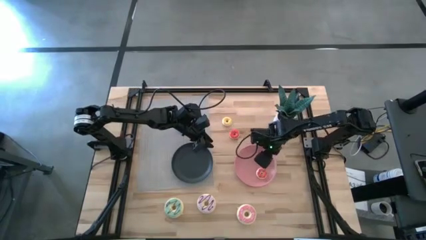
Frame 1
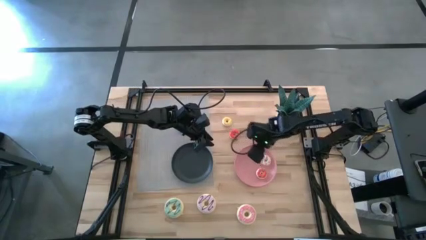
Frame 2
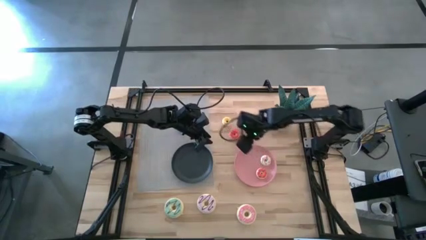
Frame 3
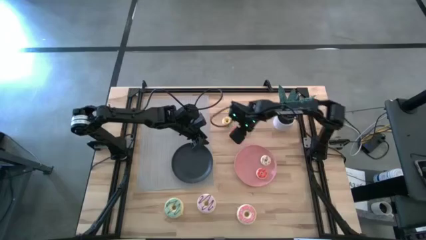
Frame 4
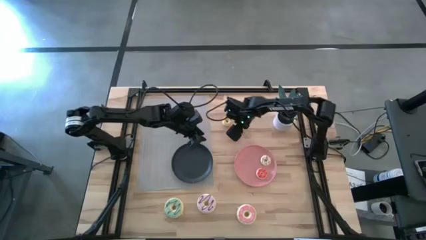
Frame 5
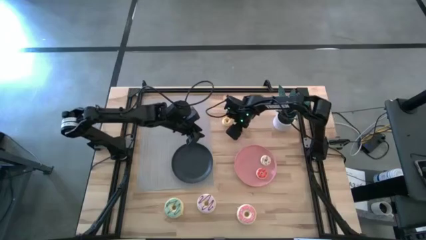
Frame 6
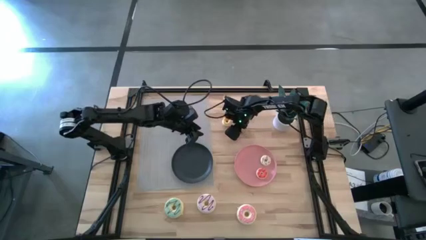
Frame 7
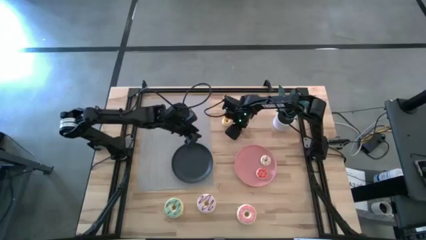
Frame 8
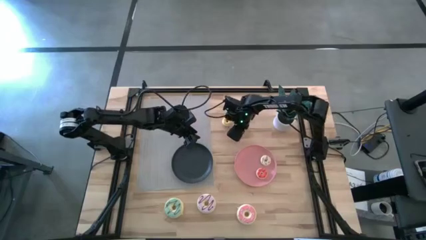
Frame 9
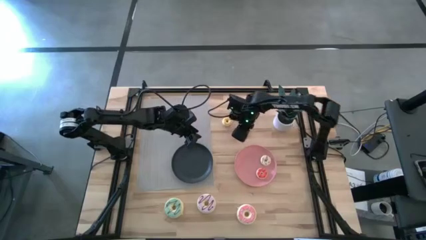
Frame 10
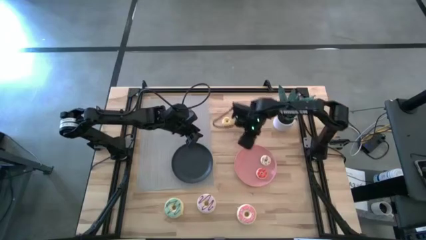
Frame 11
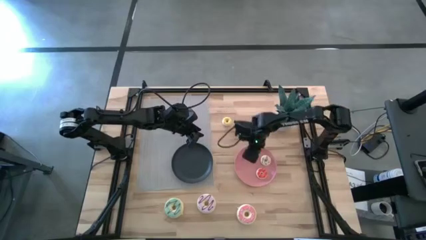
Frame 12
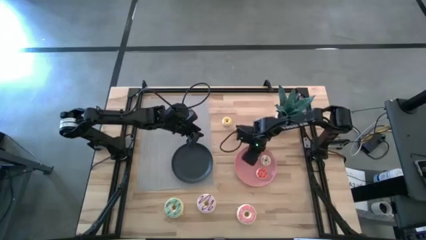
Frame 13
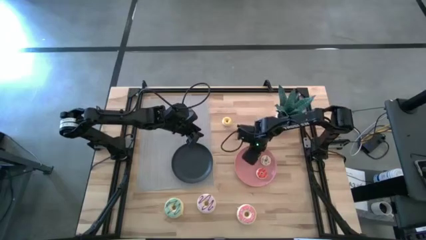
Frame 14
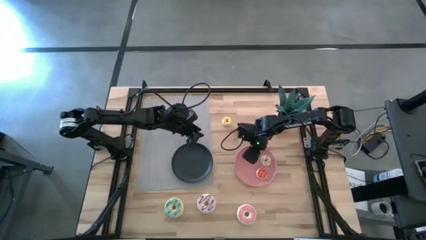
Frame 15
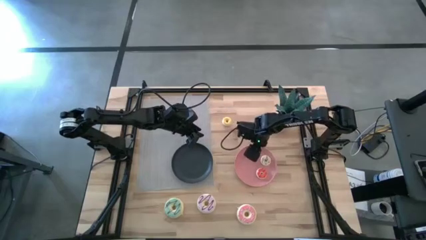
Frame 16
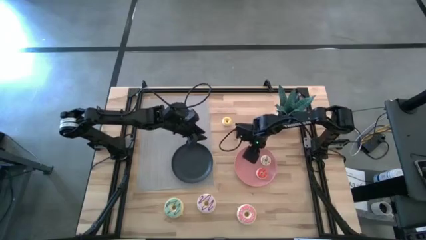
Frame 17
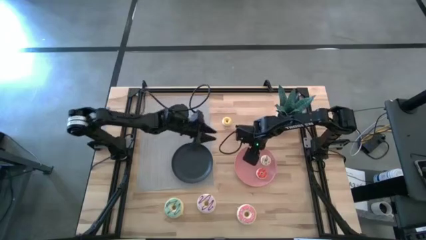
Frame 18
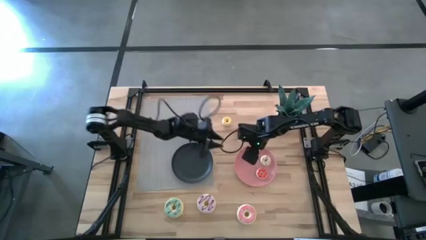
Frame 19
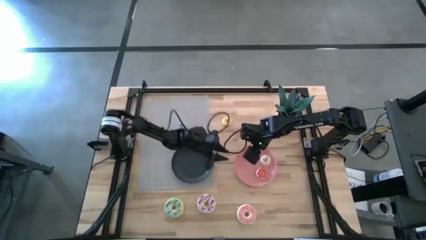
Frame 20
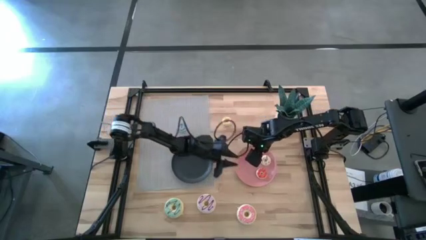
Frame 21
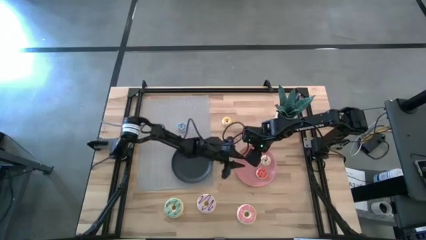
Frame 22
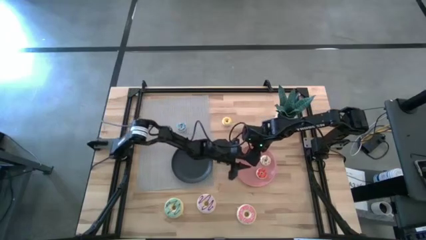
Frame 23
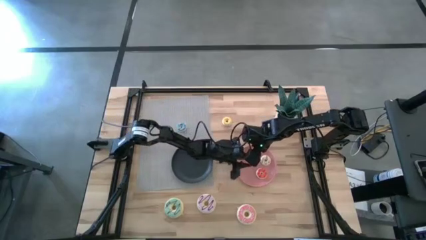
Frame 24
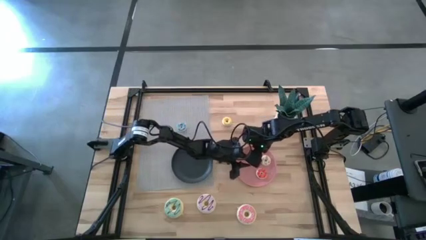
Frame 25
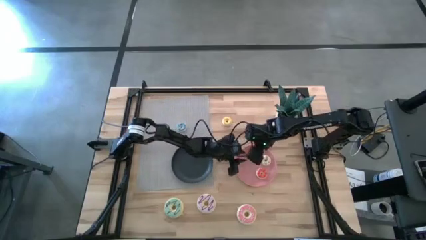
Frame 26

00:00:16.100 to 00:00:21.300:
Task: Pick & Place donuts
Put the small red donut onto the pink plate

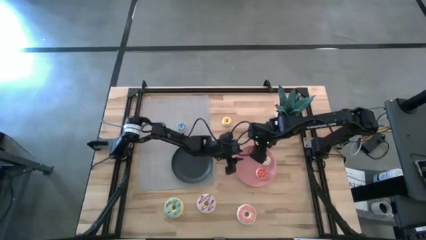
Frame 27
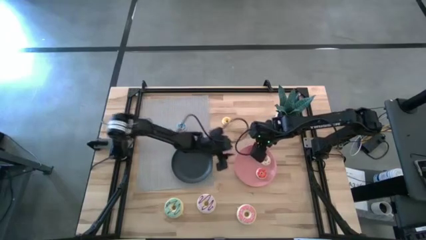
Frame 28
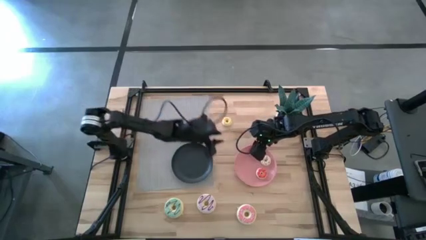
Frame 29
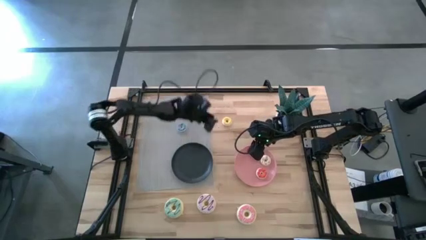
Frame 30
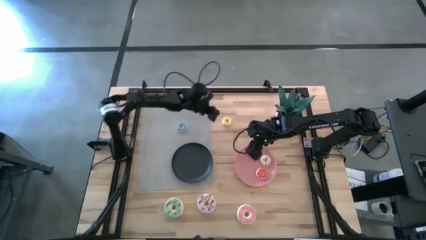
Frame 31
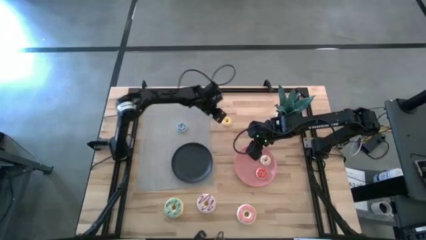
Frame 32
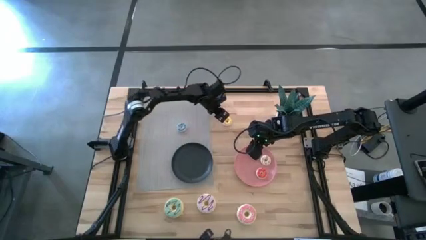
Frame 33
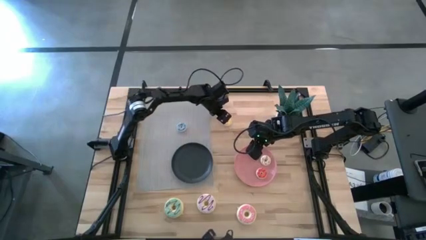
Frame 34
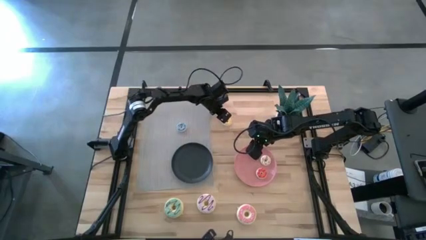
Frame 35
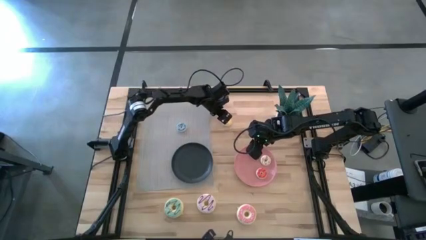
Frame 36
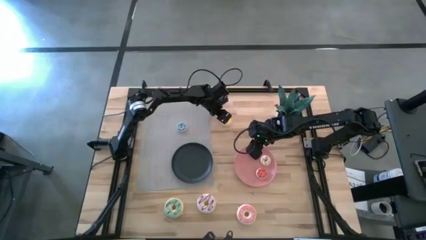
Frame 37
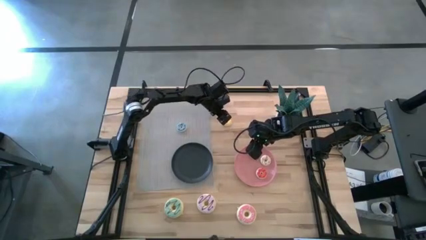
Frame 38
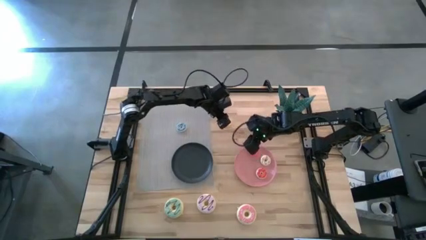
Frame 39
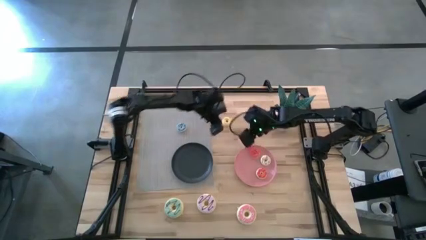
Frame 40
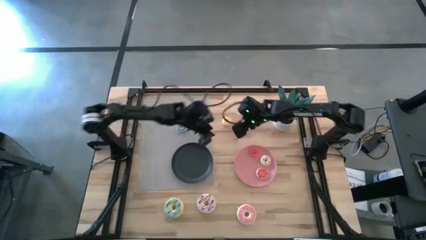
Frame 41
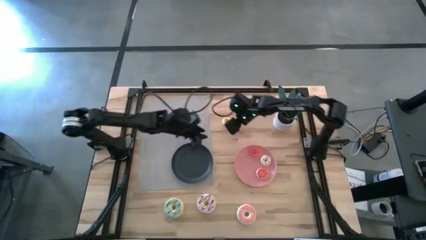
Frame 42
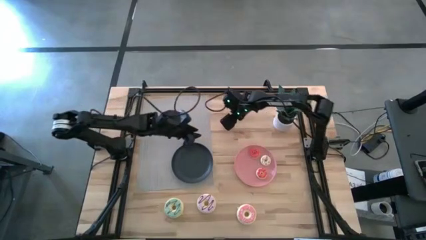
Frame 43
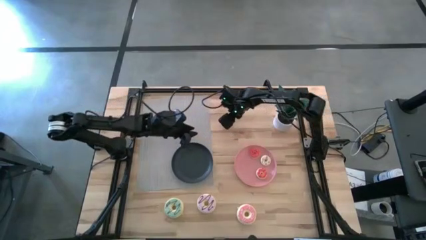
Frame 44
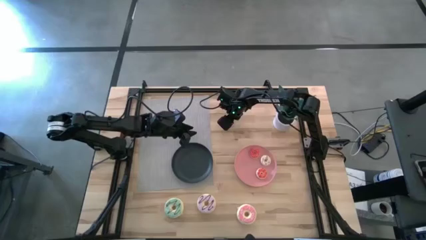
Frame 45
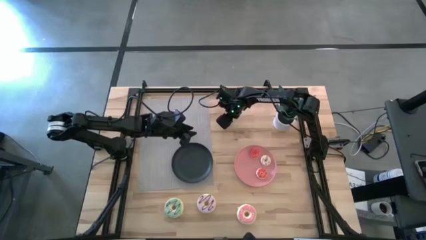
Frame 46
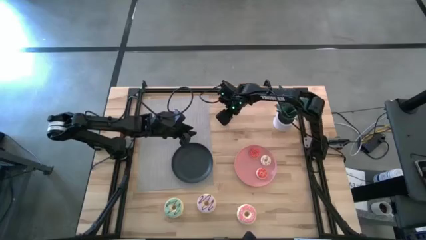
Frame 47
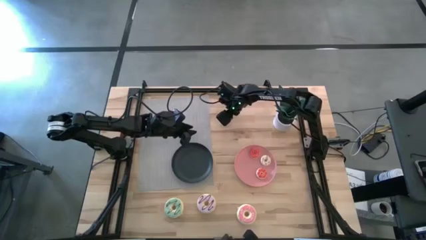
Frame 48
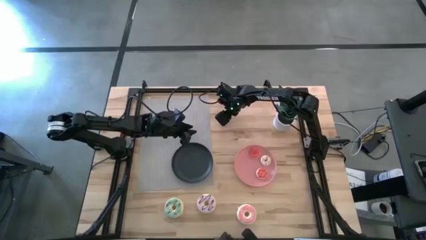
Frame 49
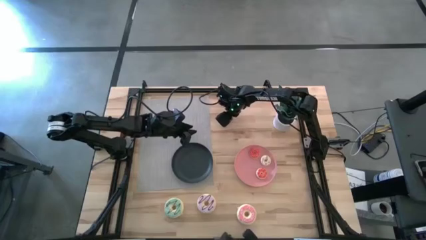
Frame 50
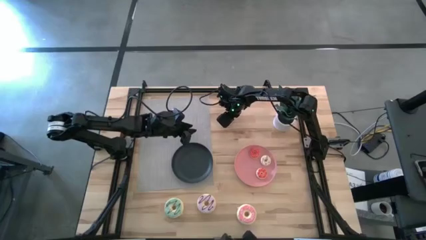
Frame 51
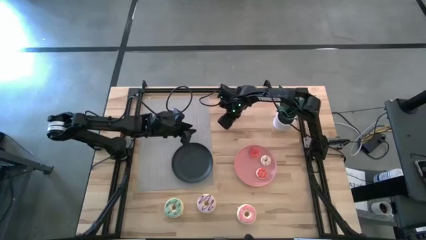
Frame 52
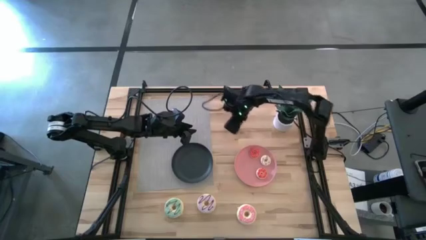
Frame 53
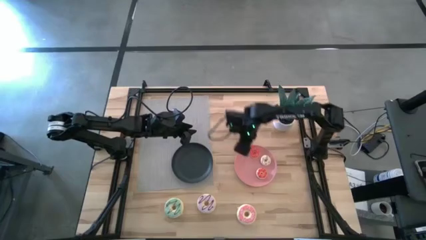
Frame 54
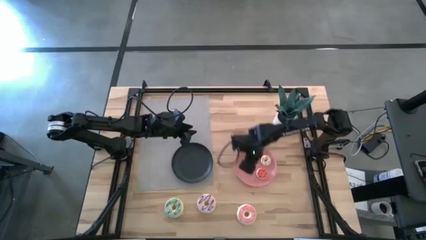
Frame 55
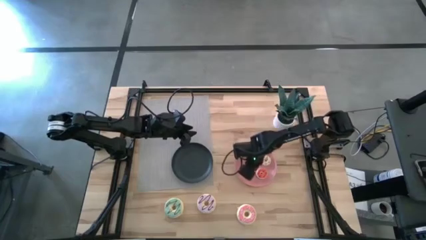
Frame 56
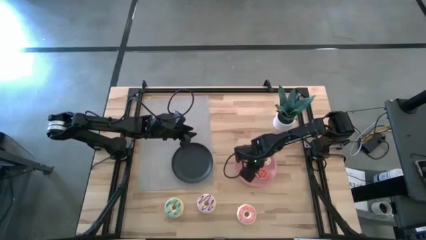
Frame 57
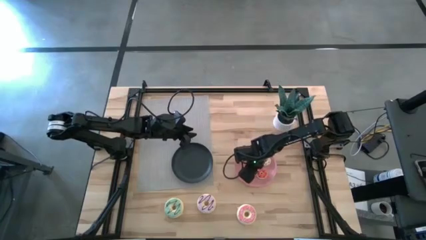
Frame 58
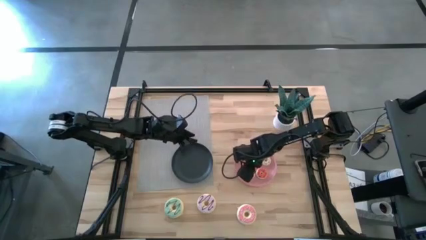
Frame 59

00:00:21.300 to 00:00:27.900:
Put the small yellow donut onto the pink plate

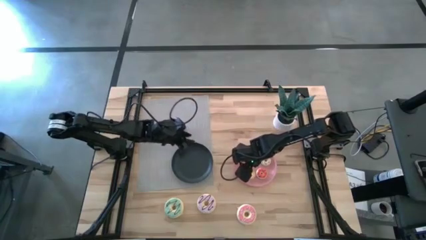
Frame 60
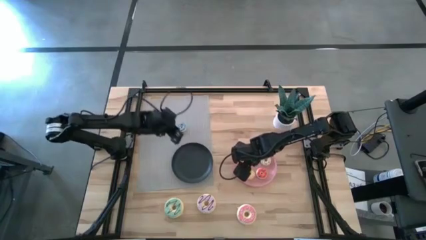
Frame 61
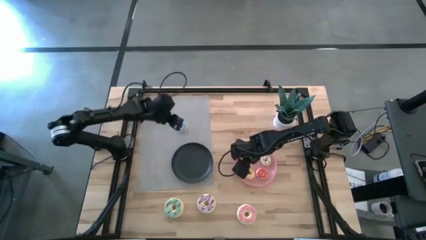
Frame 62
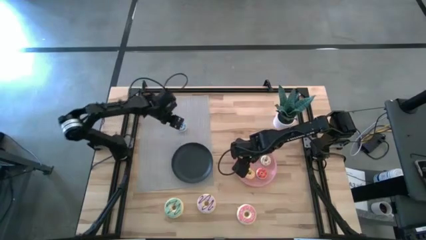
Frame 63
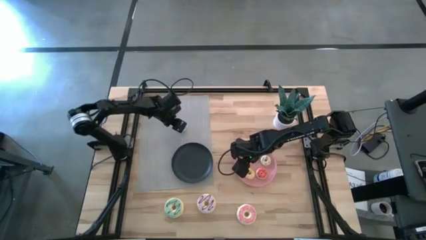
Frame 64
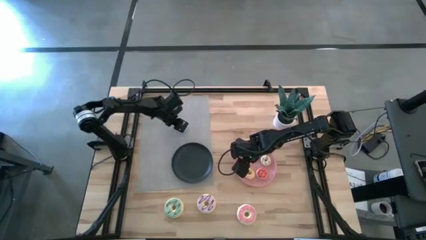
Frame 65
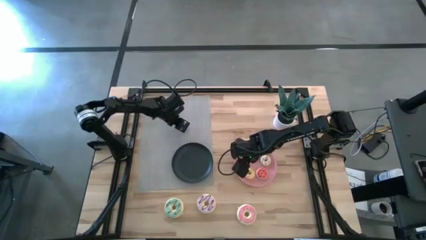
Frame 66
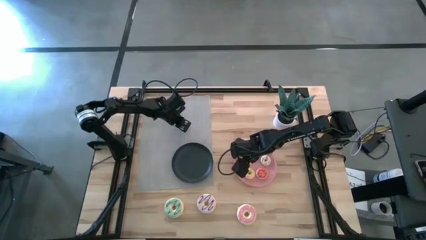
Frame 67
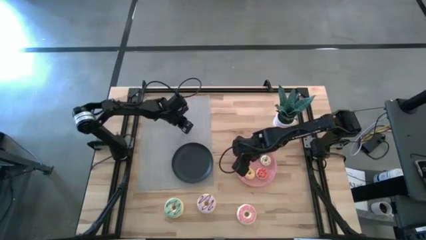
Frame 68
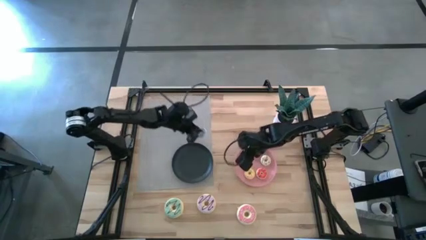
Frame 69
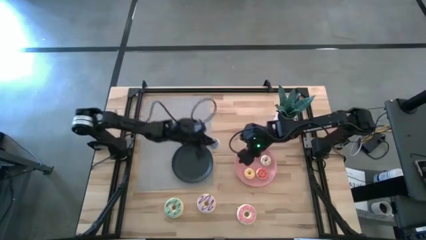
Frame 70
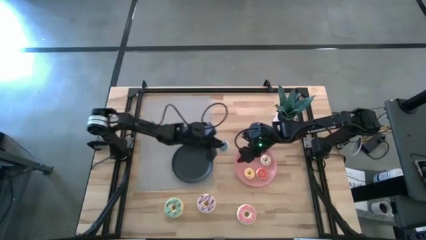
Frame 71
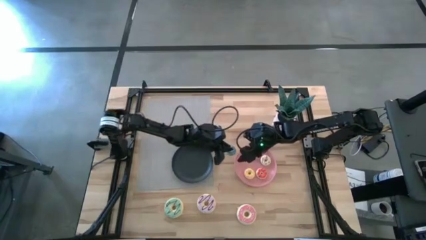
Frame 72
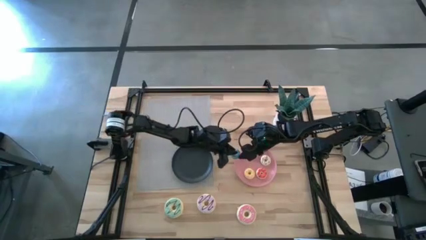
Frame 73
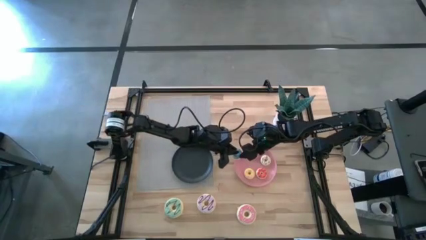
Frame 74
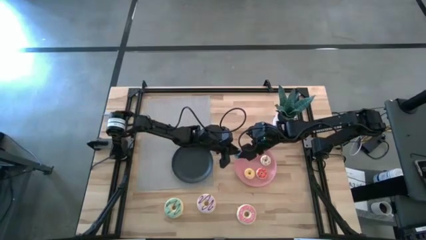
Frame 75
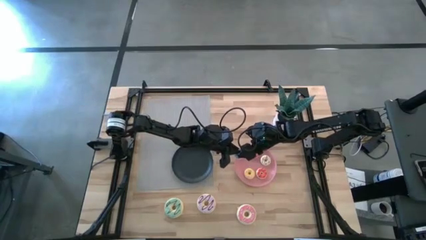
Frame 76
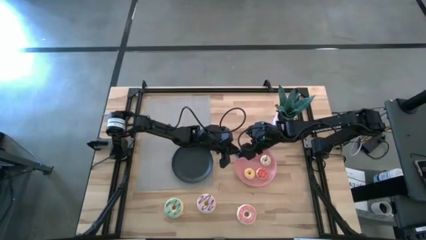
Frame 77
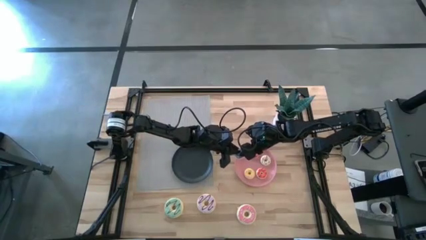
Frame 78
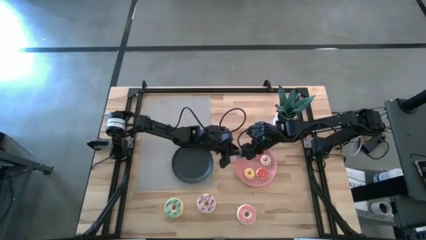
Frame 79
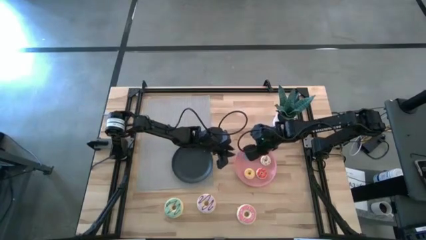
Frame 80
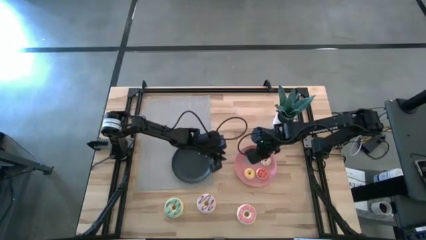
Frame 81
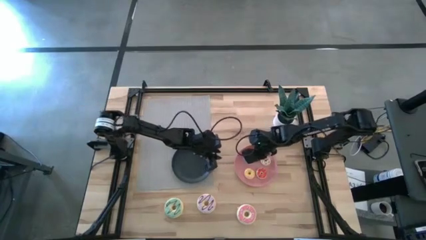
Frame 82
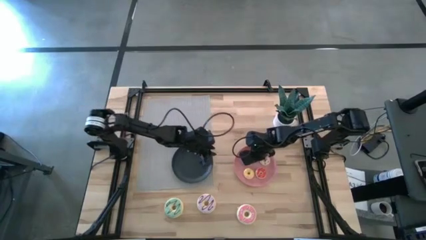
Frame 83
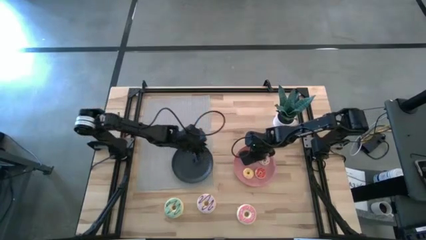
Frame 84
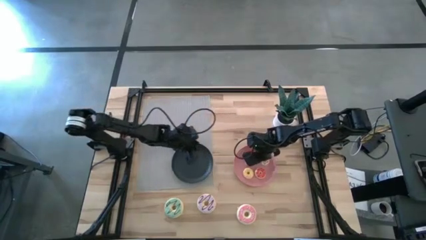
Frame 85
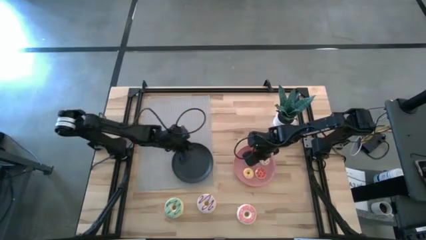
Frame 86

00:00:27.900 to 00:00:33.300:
Put the small blue donut onto the pink plate
